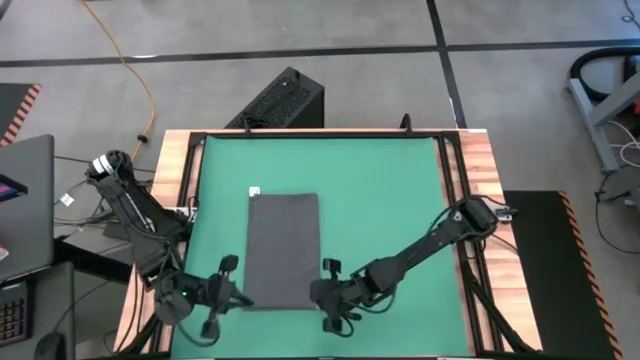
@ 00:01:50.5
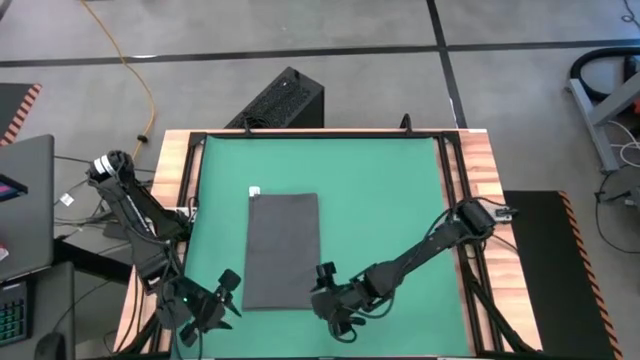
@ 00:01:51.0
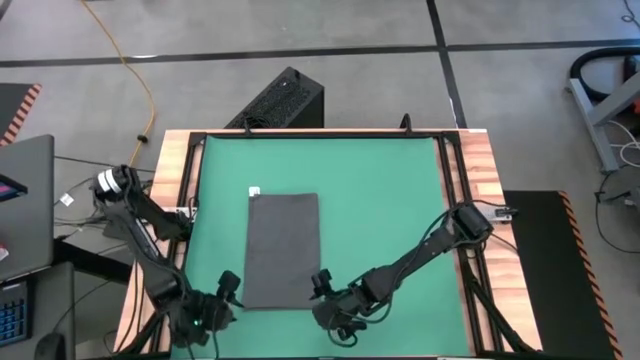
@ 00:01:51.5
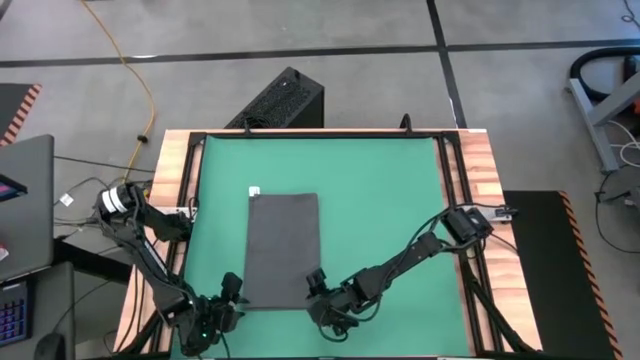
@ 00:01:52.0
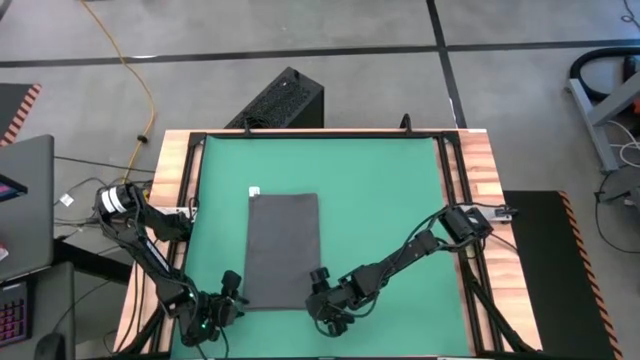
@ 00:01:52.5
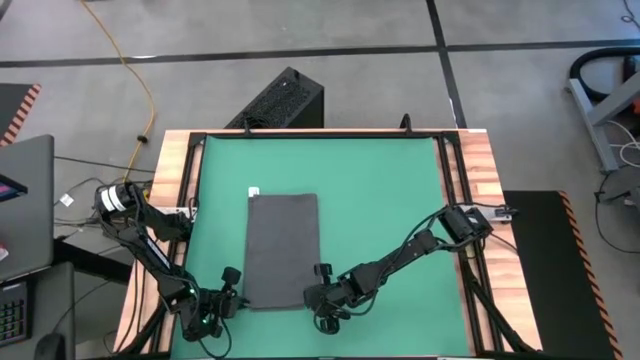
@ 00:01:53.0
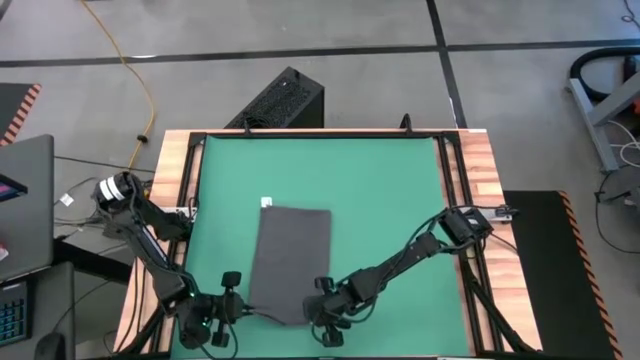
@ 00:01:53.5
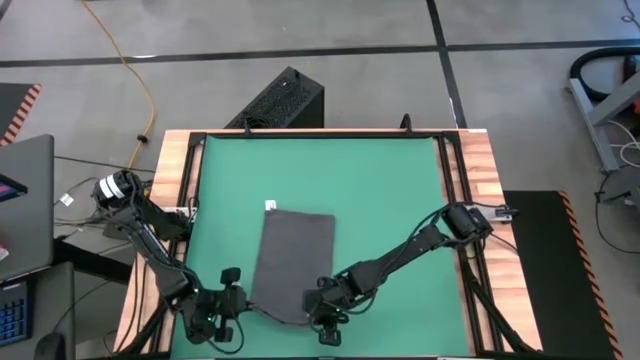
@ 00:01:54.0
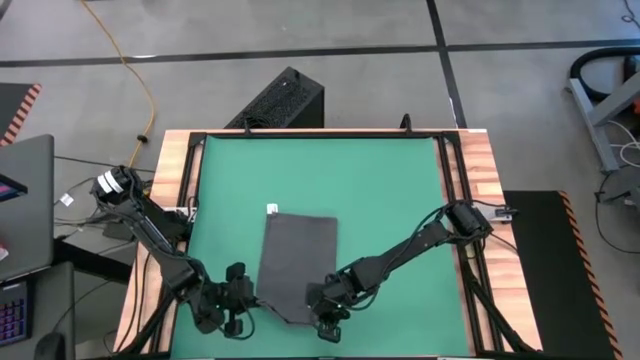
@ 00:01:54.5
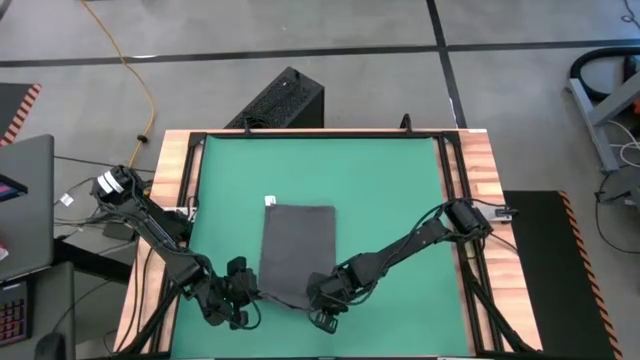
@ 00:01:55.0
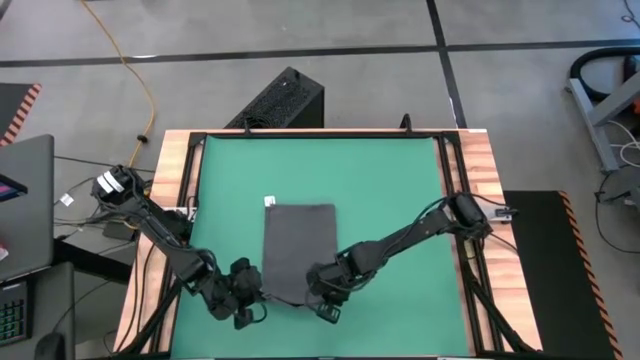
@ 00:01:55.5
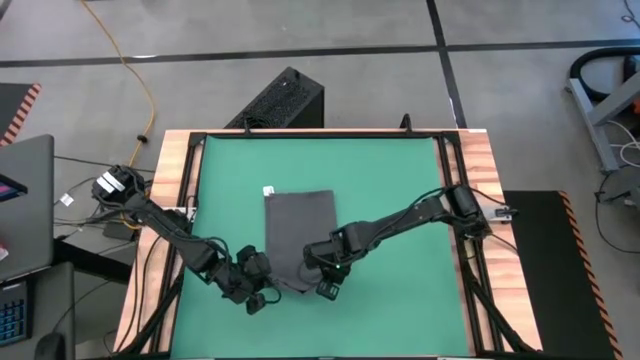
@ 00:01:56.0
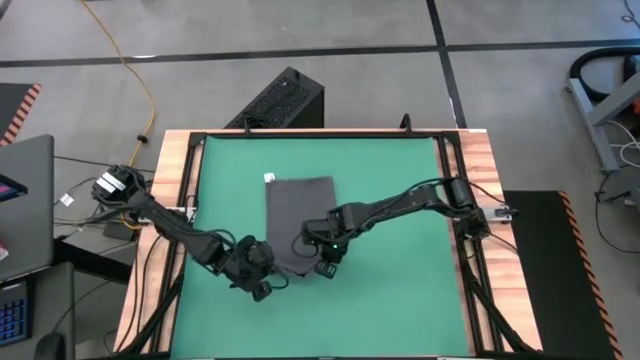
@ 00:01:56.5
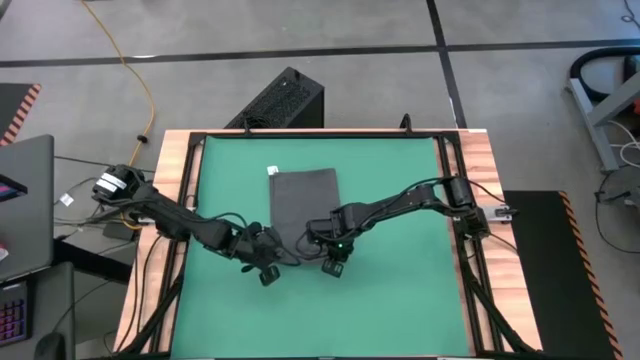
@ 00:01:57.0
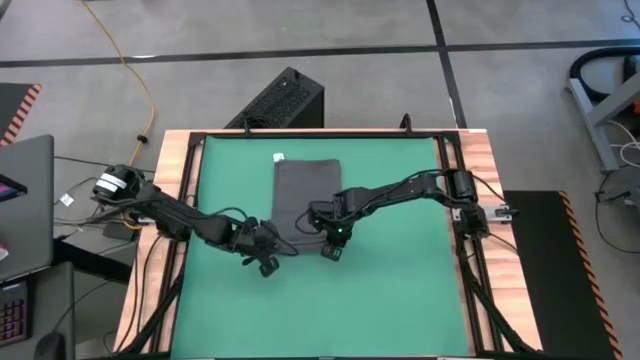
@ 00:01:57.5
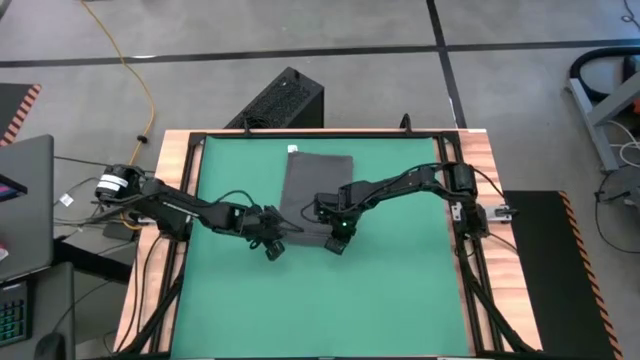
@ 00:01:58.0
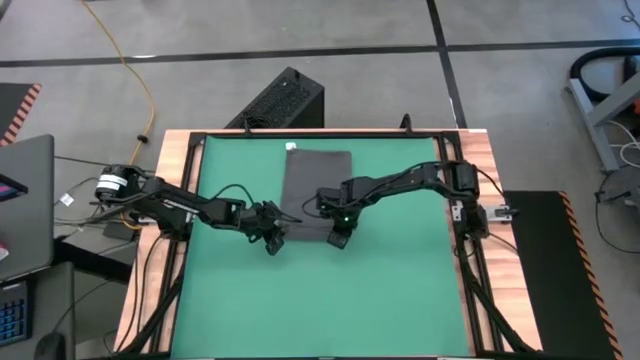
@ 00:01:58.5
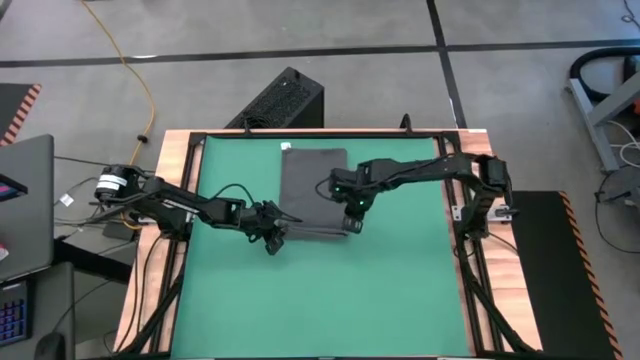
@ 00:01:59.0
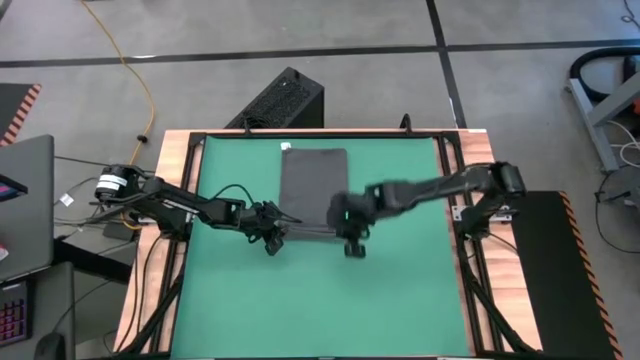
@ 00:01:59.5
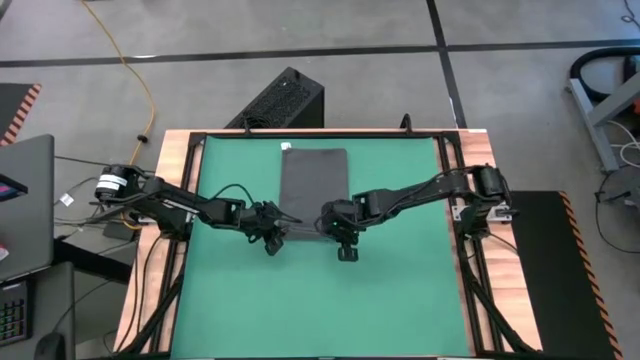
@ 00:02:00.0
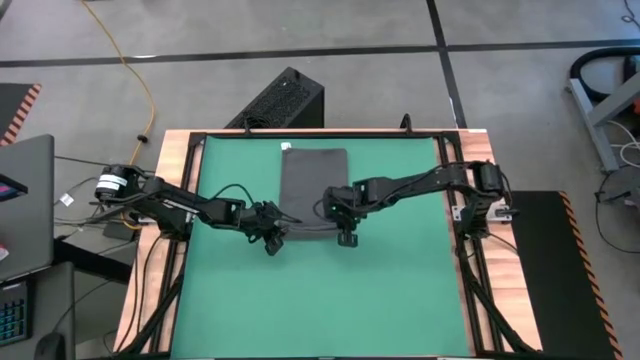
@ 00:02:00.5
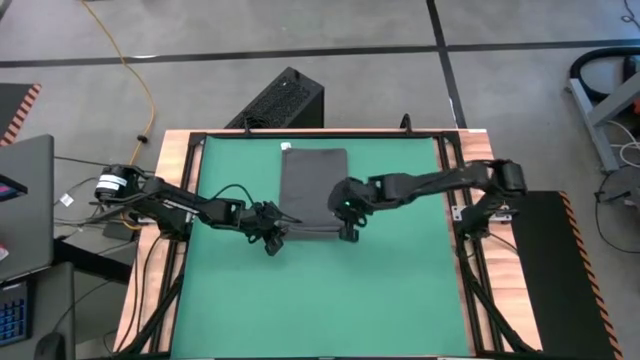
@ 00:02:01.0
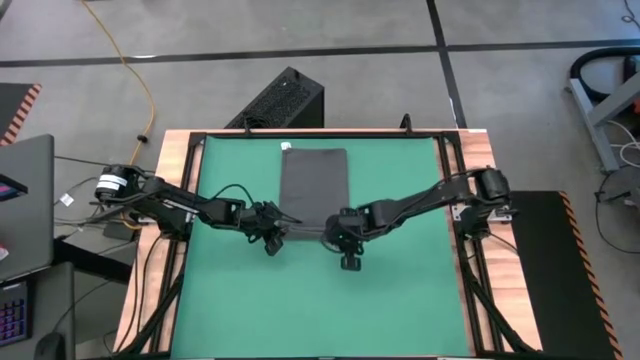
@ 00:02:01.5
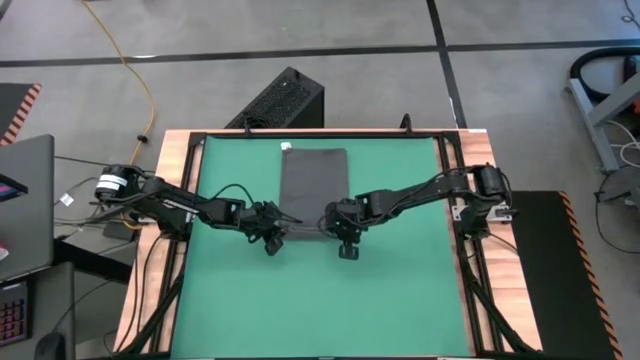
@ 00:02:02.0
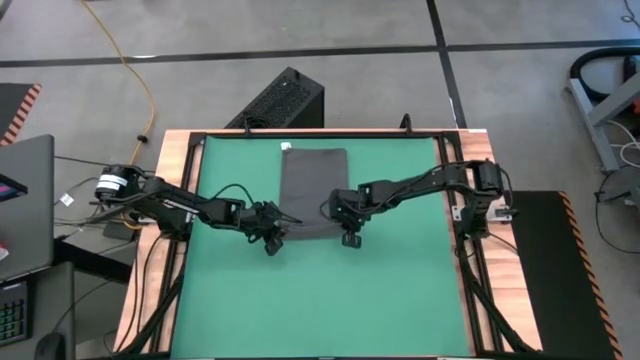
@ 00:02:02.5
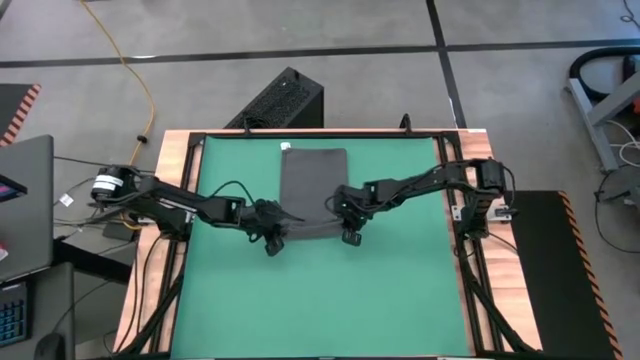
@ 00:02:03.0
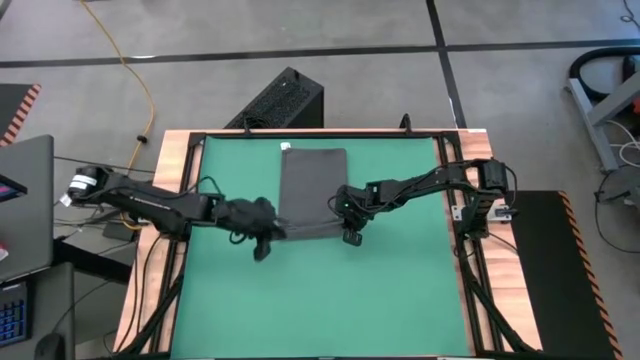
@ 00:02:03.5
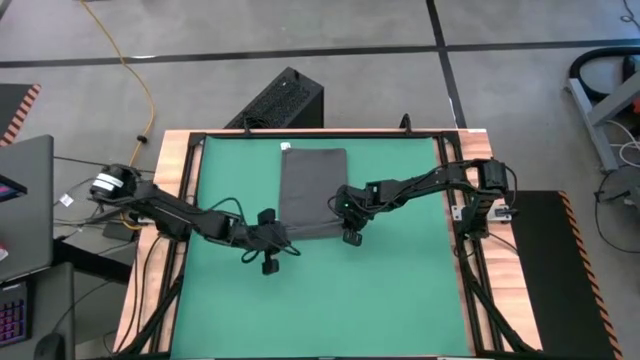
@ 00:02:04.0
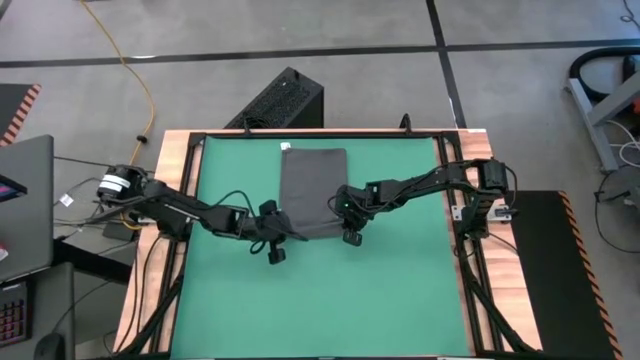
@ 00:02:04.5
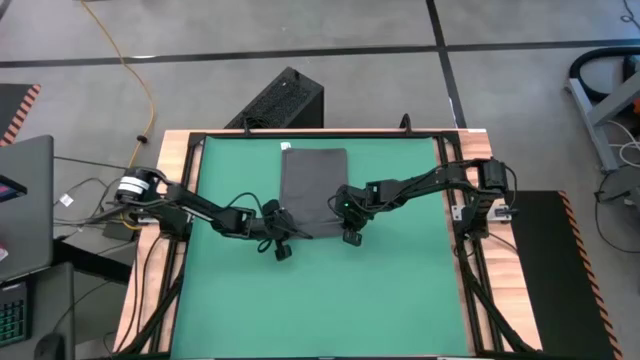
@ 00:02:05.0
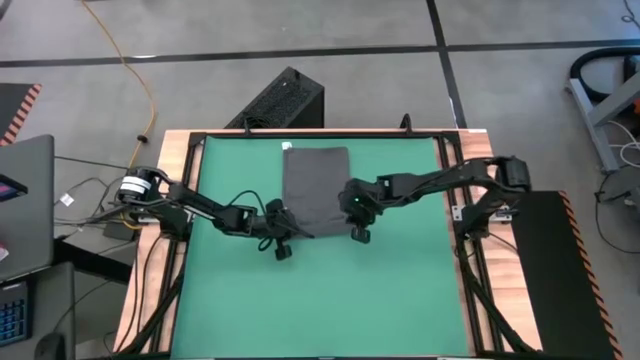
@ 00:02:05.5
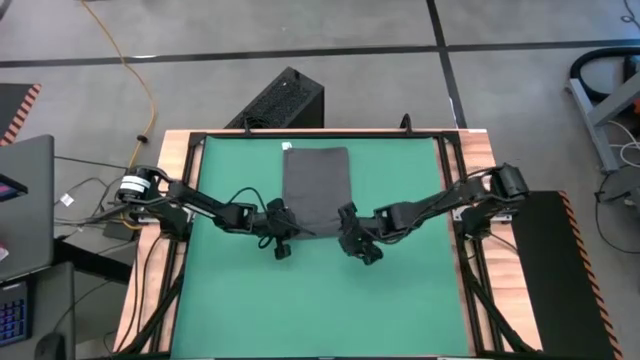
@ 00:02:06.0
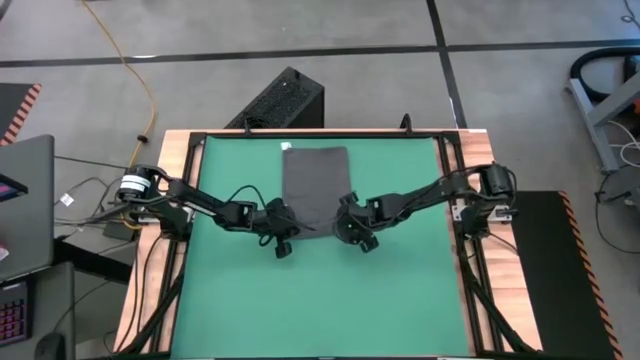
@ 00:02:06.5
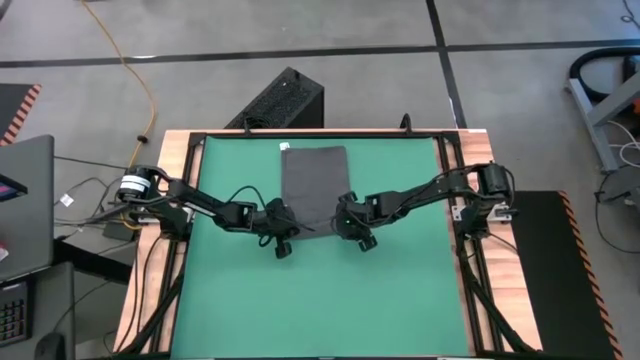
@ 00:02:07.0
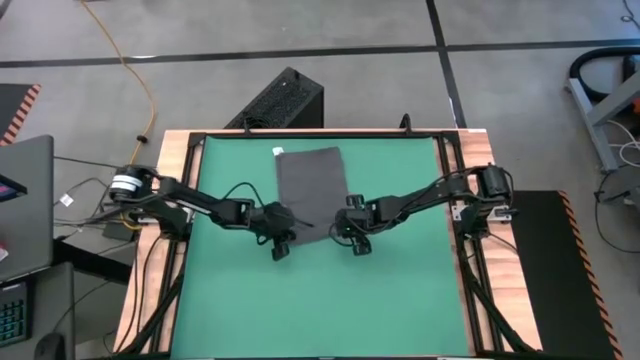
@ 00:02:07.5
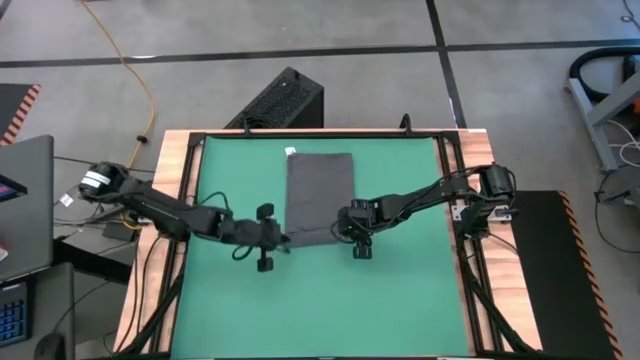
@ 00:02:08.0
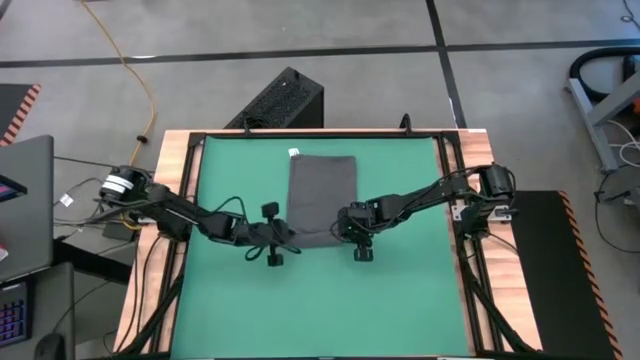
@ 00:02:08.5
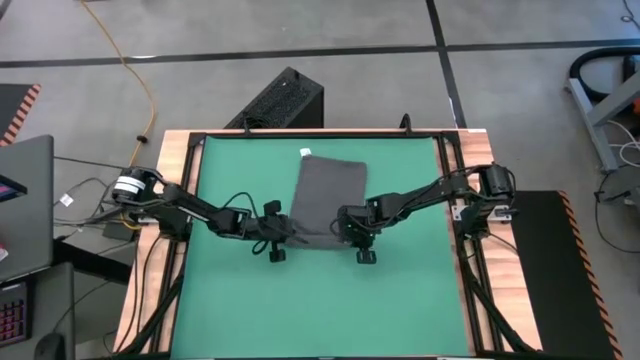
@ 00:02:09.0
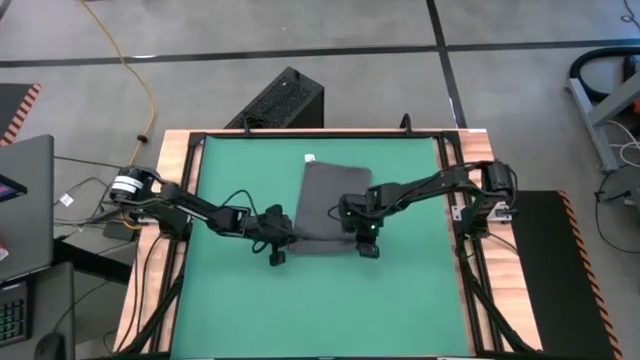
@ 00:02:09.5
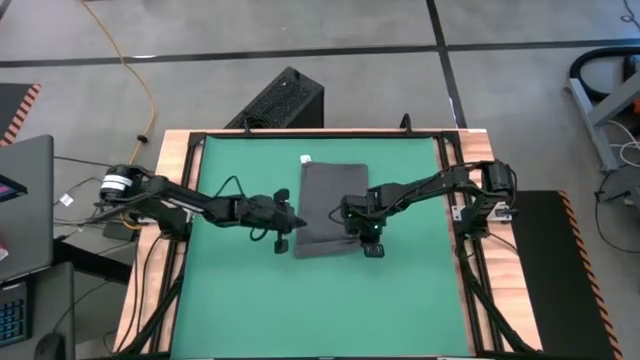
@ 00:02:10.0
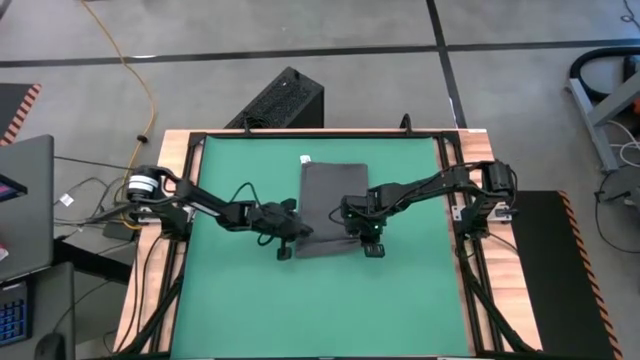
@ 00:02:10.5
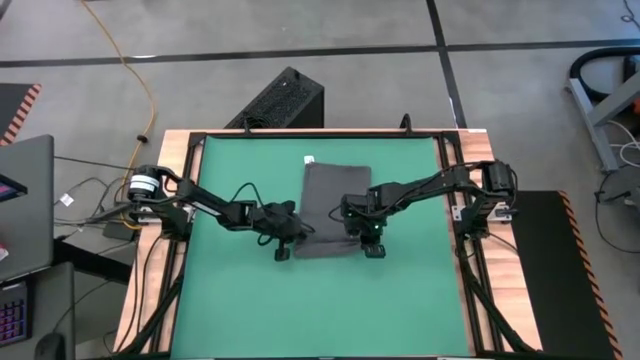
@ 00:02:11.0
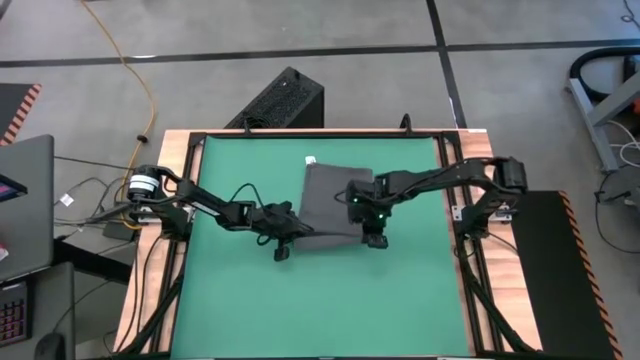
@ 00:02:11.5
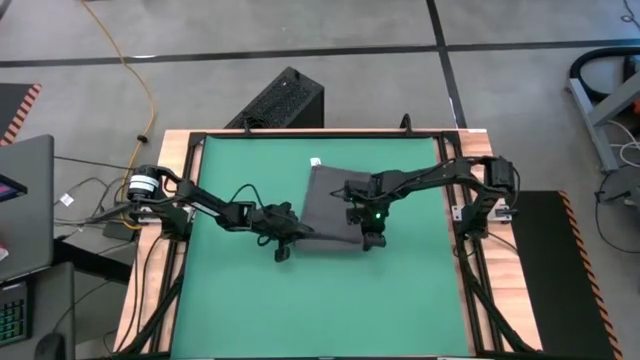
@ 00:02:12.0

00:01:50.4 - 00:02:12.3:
Task: Roll towel
Roll the microfiber towel
